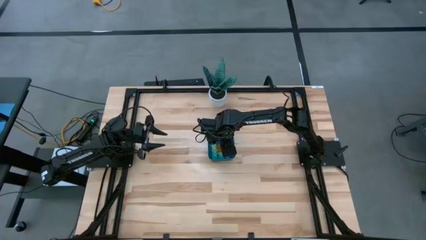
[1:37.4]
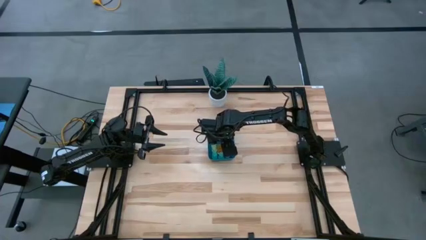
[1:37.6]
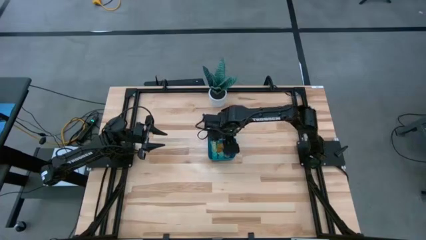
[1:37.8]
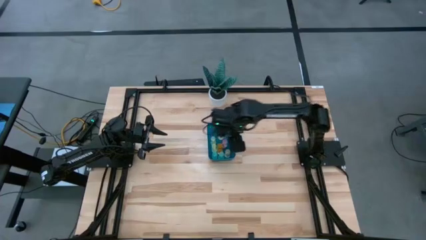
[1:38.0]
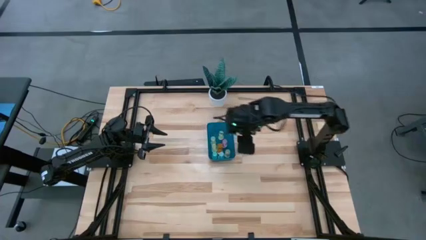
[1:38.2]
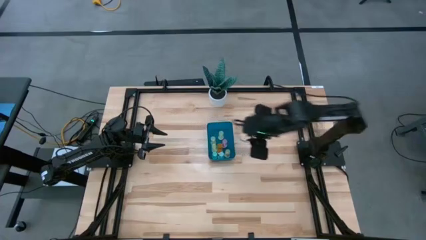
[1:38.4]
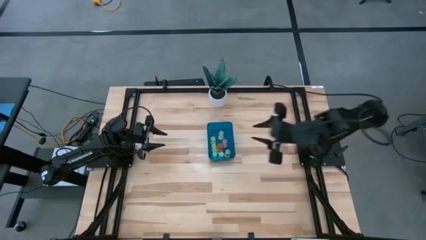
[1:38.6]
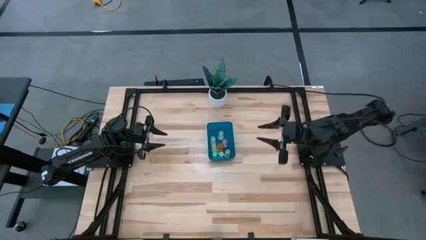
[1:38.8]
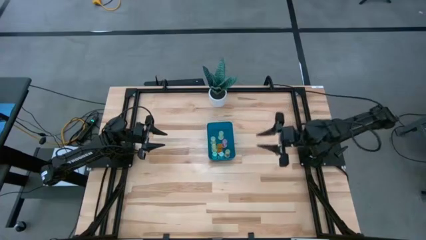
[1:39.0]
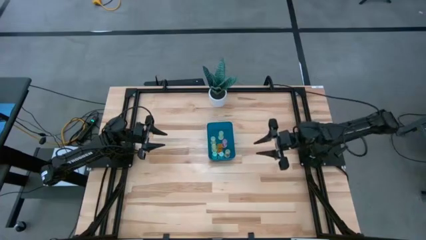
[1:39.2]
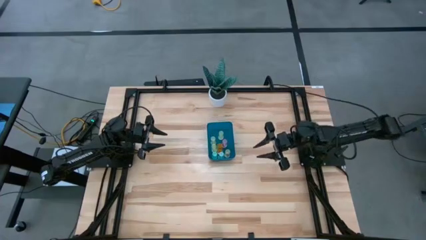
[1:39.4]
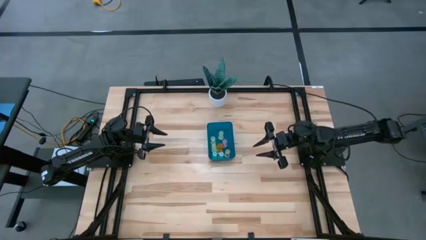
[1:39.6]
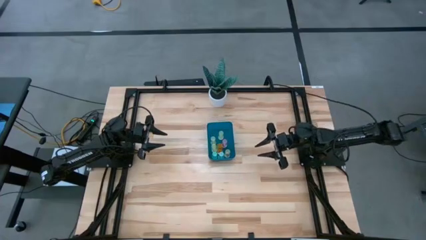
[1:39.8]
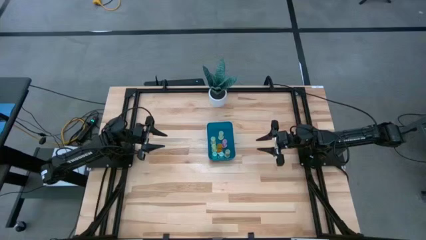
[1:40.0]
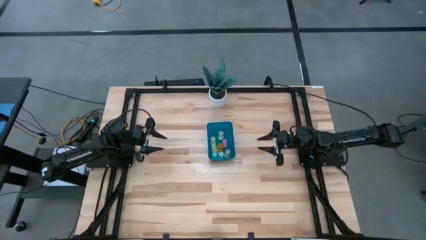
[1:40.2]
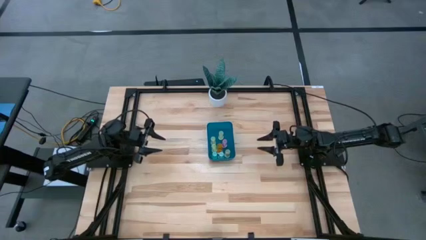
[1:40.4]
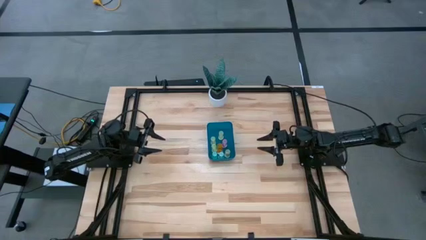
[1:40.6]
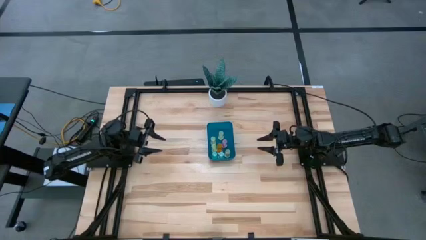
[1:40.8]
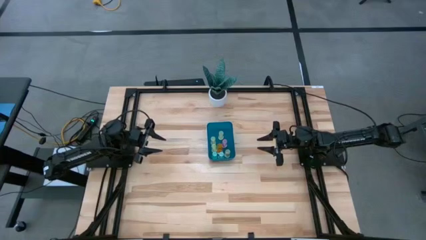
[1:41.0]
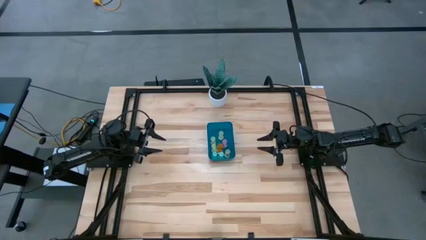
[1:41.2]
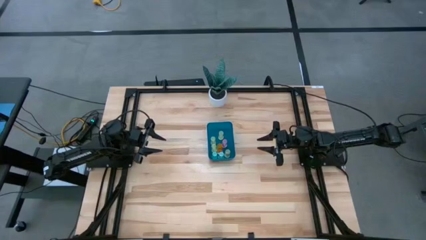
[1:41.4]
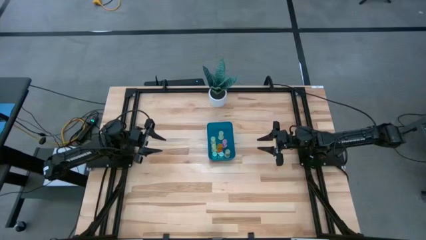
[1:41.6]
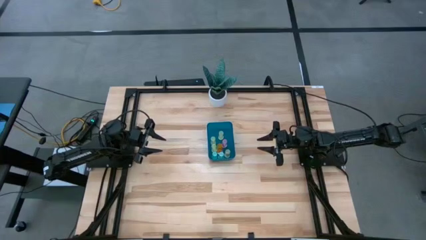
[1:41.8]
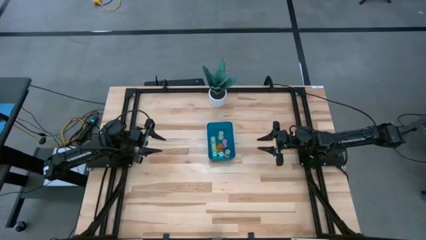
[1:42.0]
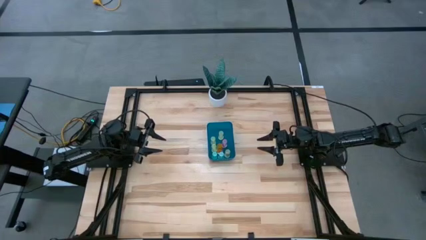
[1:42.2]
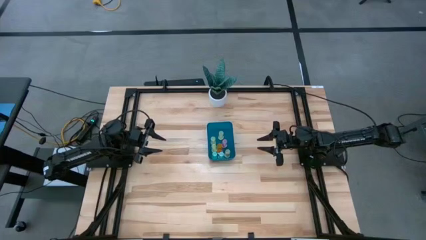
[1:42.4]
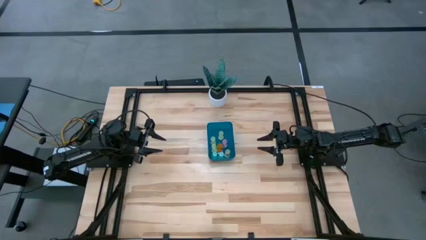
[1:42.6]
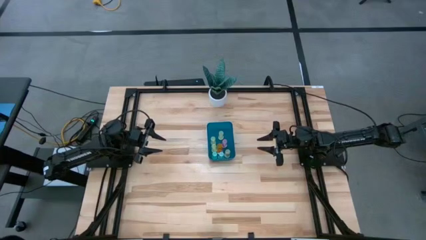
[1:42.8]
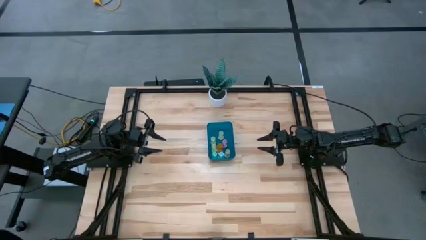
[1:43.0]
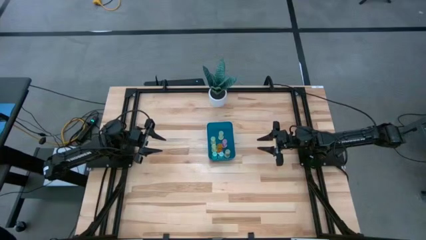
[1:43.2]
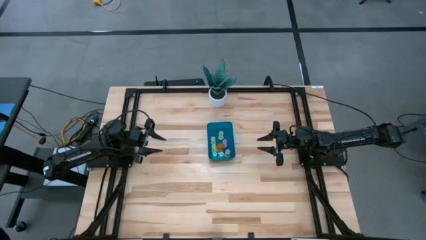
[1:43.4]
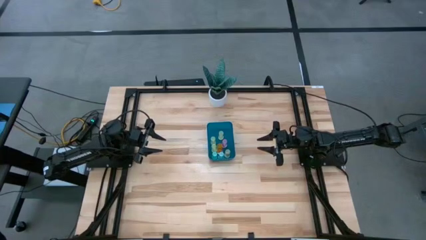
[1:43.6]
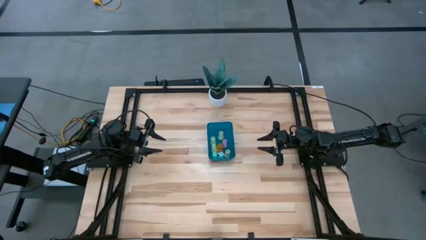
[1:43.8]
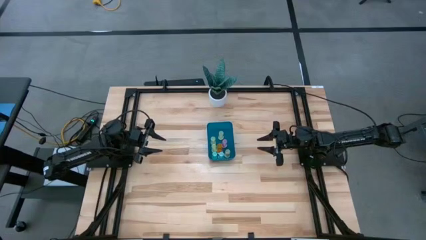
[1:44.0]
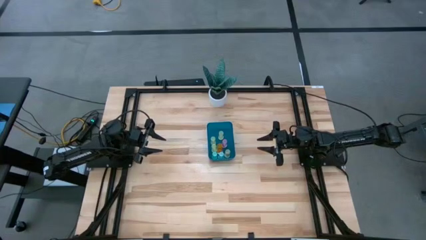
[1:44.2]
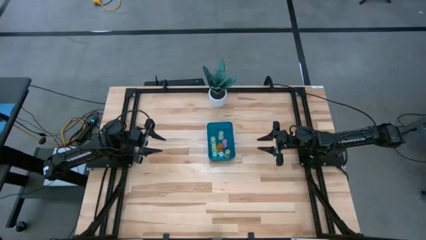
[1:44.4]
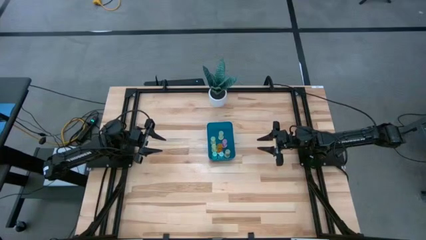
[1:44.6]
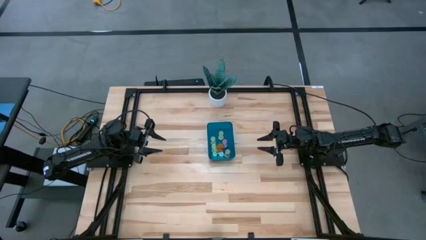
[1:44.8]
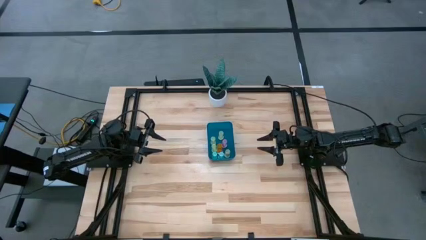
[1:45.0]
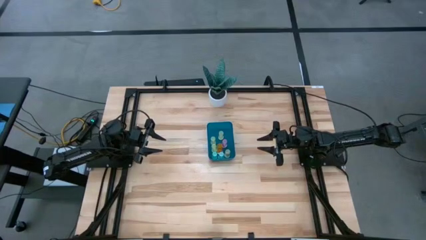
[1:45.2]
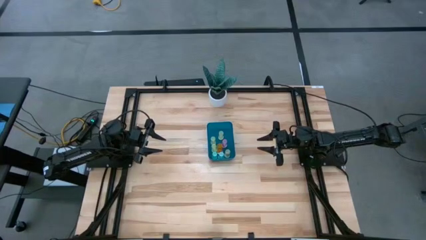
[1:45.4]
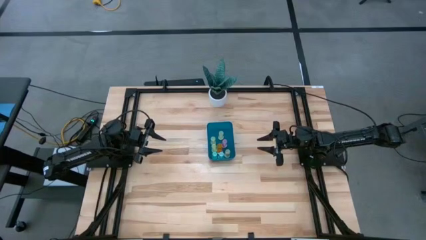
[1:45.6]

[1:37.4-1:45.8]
Task: Pick and place pill bottles into a basket
Return to Home Position

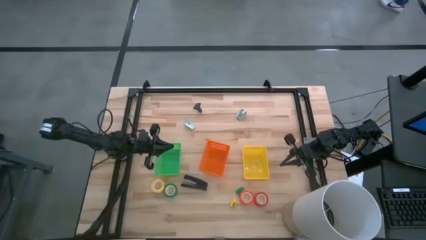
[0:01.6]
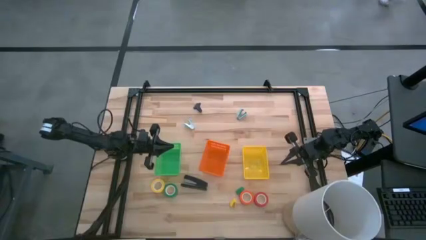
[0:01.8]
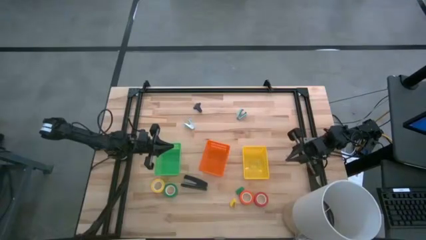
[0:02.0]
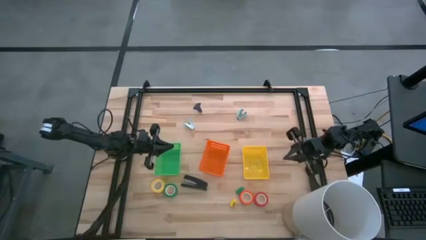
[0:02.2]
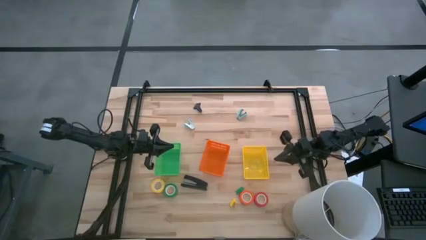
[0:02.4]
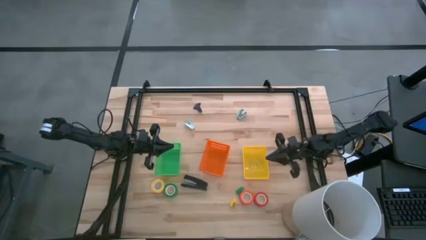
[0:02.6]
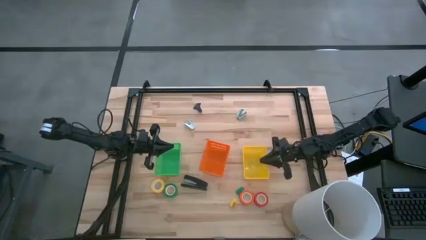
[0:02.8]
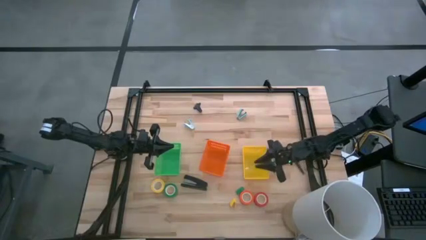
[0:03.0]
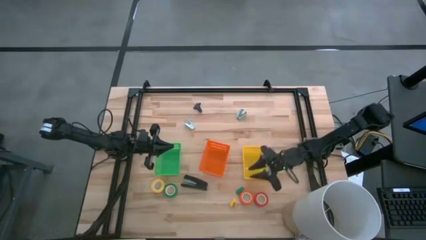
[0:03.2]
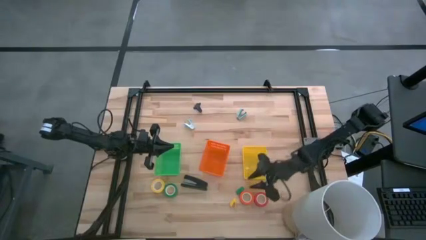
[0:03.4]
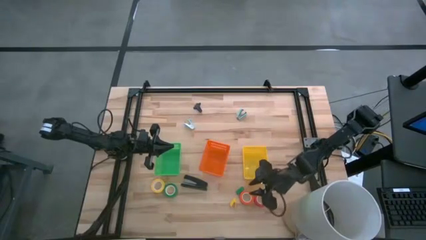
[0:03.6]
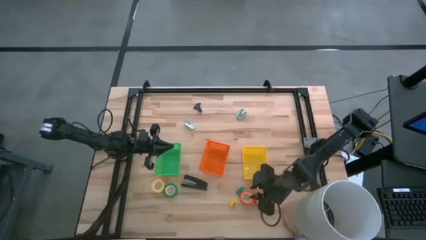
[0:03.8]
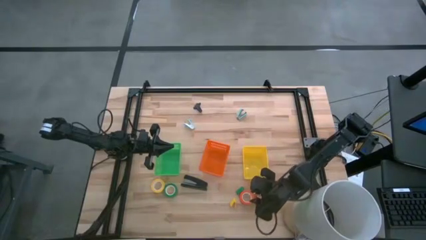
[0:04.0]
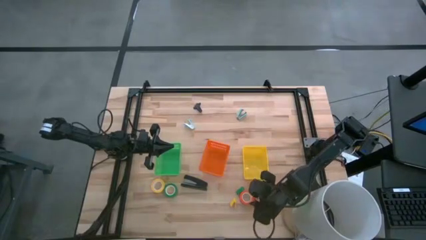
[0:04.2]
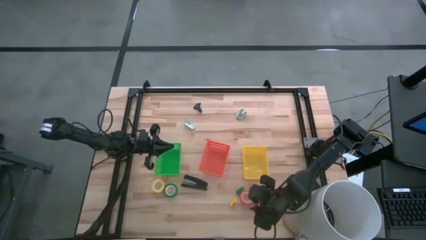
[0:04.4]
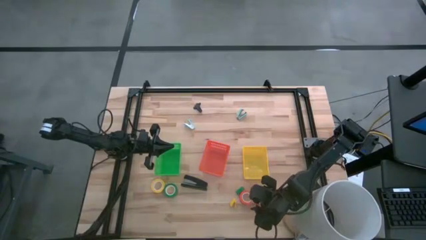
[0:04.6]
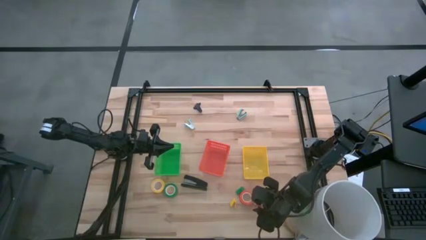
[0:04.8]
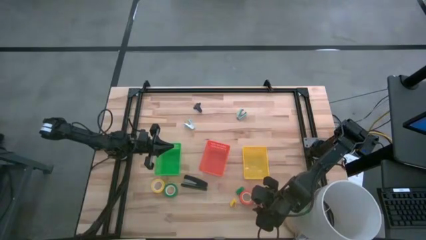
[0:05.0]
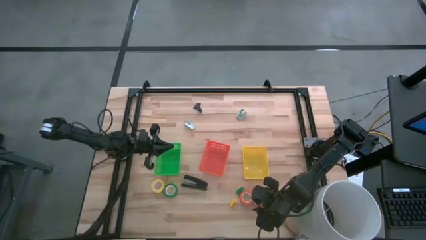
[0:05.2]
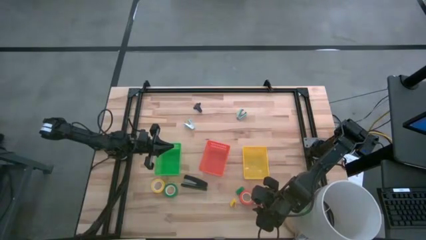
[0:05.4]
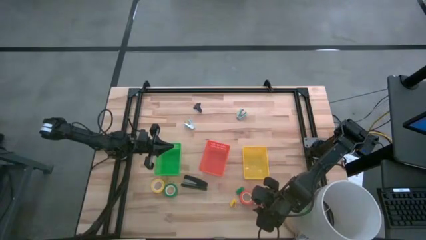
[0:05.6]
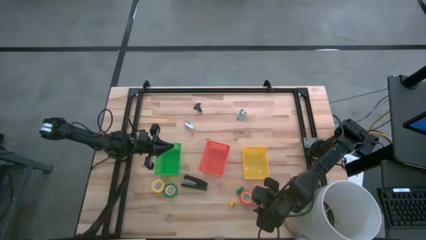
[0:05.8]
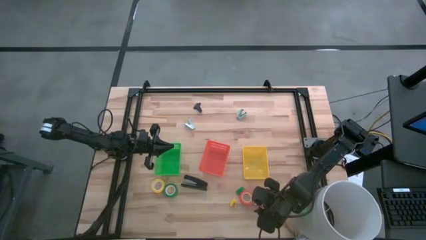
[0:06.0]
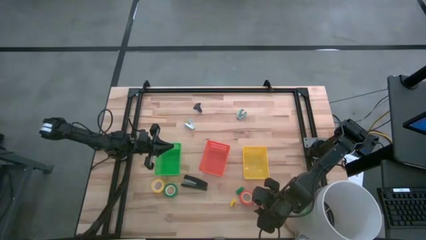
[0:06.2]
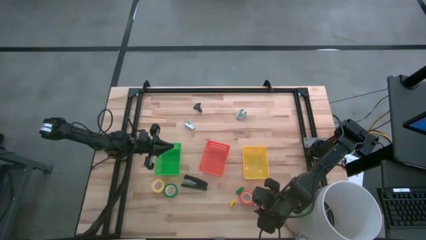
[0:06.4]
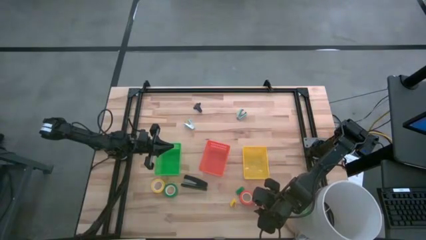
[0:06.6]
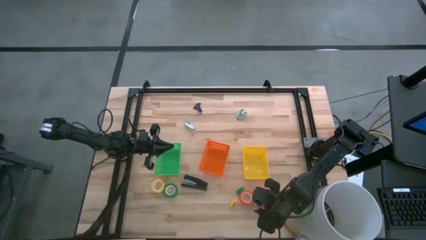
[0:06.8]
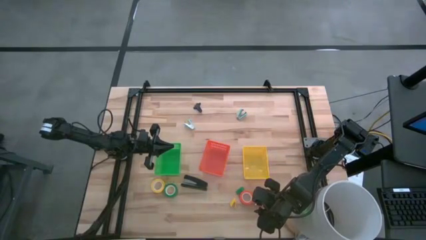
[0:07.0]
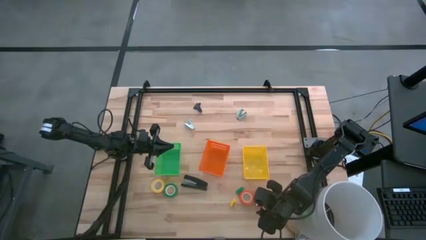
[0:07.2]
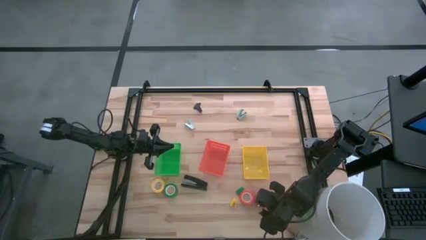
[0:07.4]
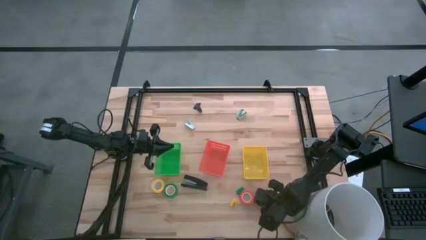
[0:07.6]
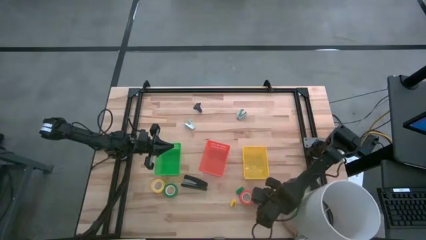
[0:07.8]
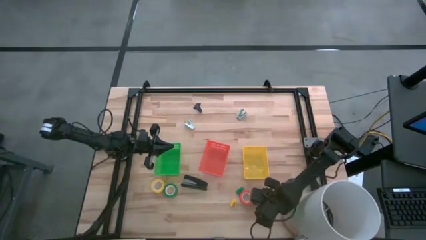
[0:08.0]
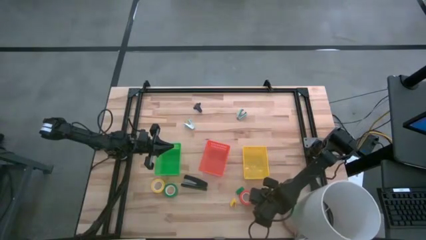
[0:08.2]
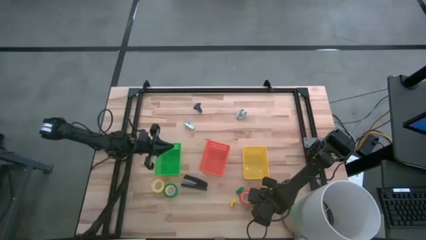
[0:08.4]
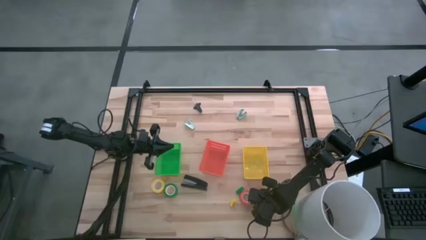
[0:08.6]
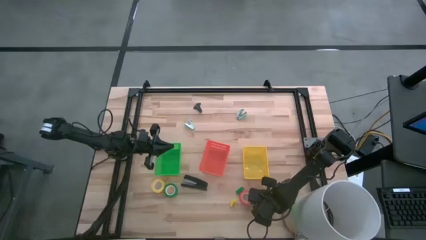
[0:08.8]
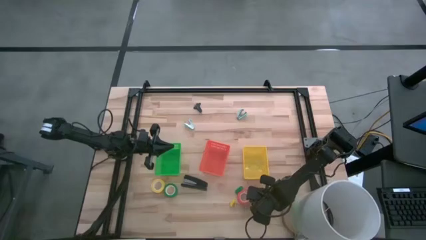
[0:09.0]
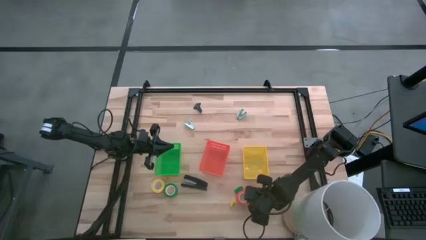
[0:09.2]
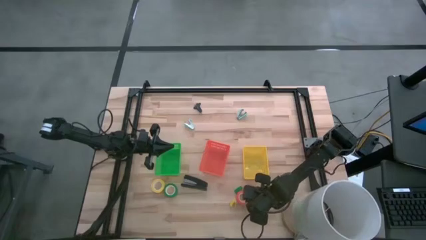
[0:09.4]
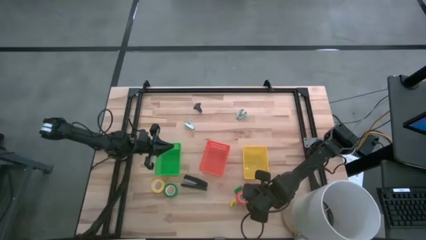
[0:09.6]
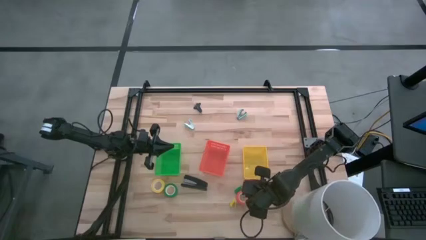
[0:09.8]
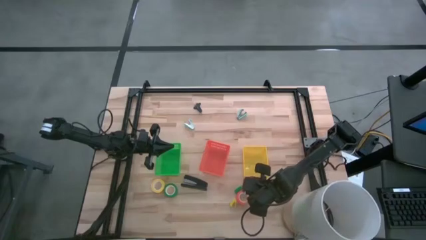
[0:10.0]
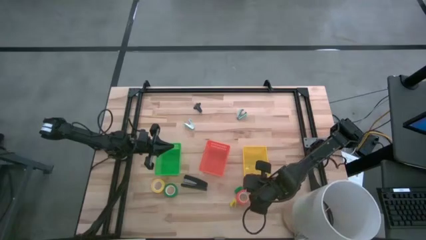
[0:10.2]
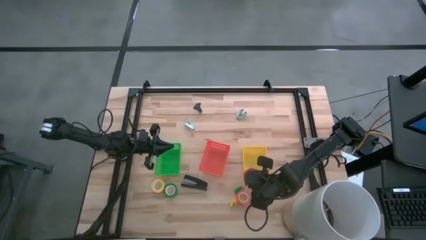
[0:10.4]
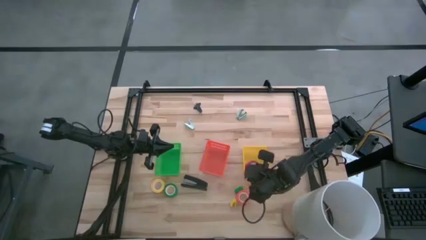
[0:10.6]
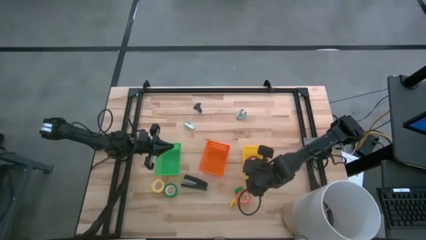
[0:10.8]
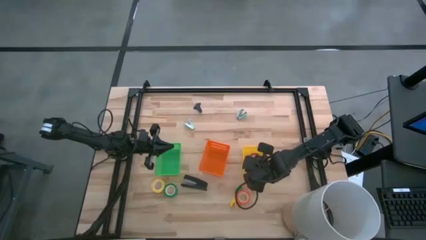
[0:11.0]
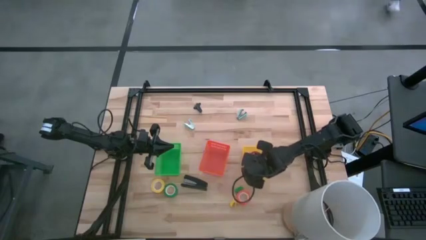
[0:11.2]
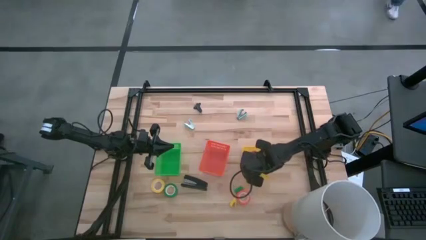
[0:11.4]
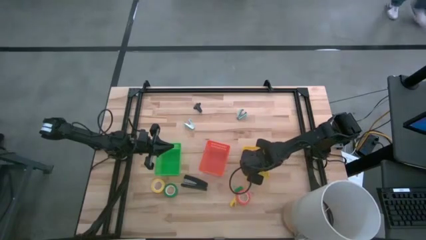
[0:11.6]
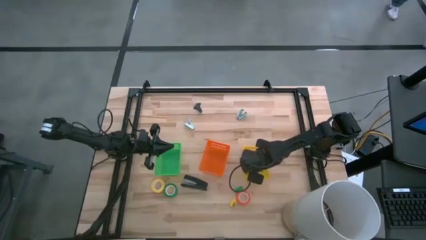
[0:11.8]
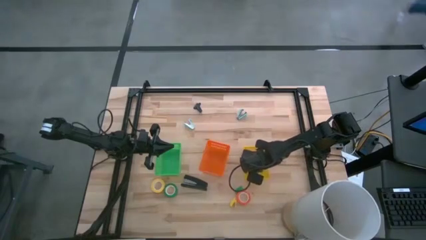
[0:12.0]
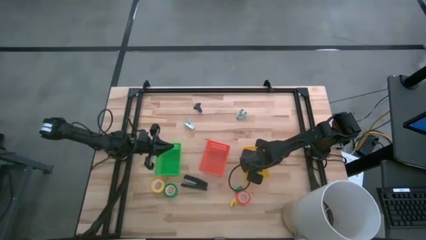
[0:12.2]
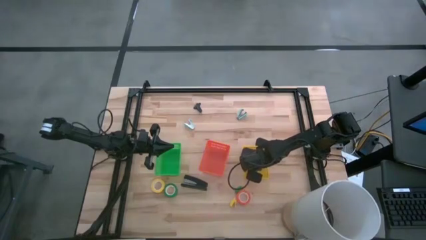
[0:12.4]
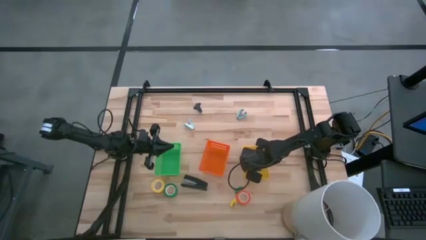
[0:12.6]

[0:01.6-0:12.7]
Task: Pick and place Stapler, Stapler remover, tape
Put the red tape into the yellow bin
